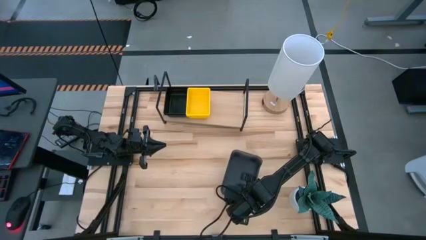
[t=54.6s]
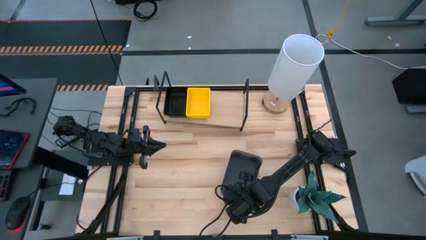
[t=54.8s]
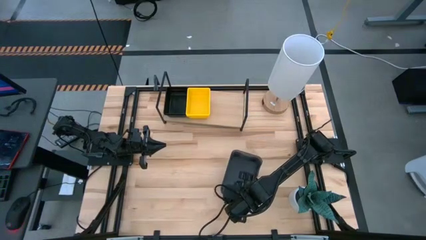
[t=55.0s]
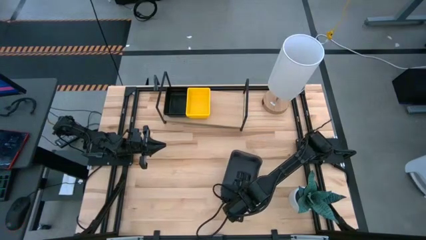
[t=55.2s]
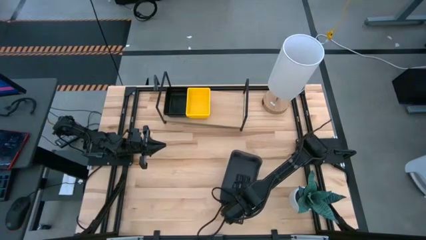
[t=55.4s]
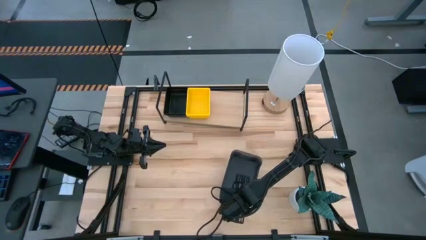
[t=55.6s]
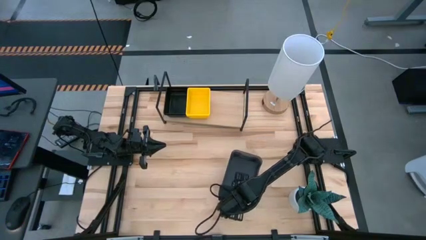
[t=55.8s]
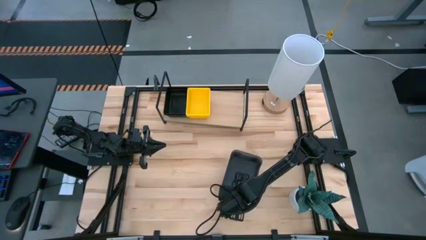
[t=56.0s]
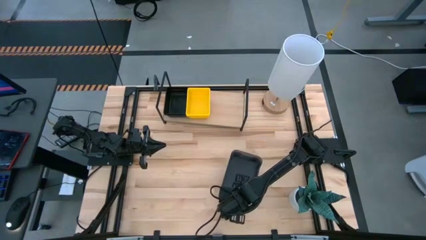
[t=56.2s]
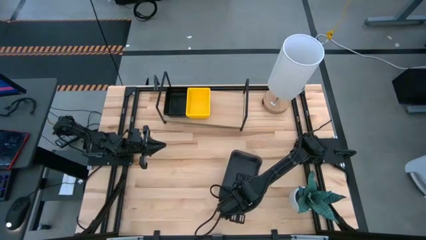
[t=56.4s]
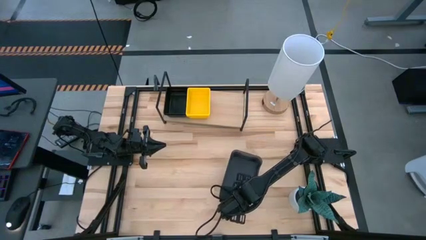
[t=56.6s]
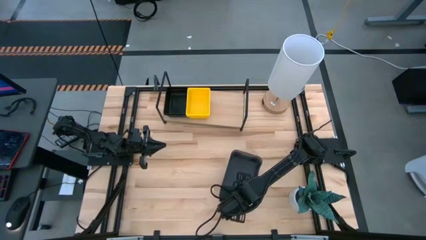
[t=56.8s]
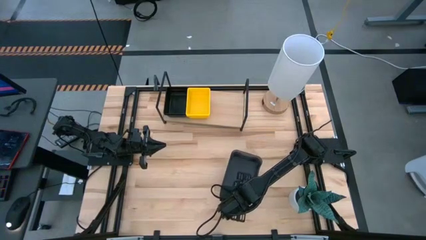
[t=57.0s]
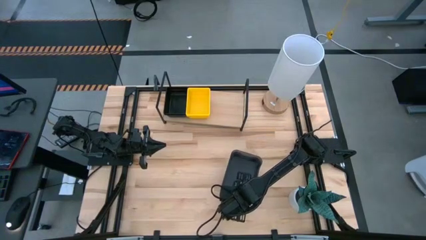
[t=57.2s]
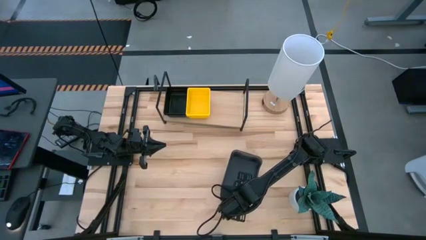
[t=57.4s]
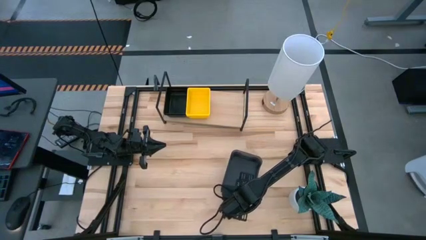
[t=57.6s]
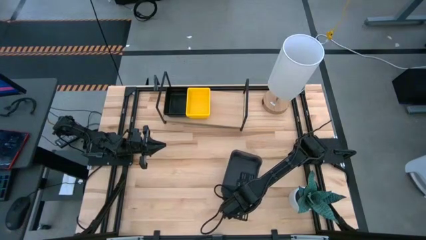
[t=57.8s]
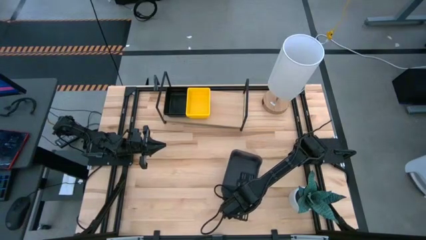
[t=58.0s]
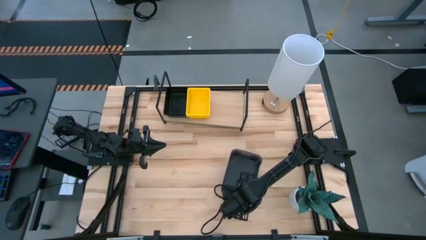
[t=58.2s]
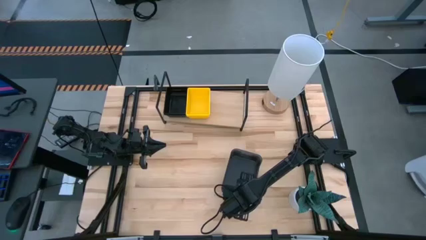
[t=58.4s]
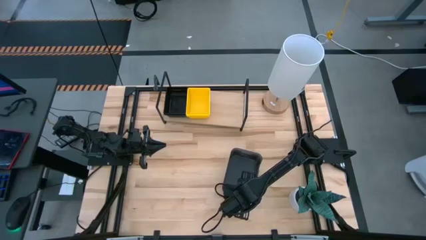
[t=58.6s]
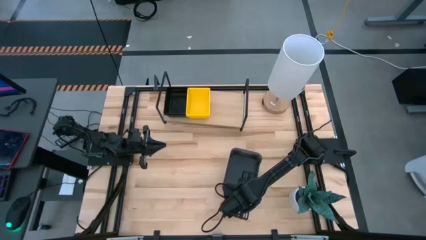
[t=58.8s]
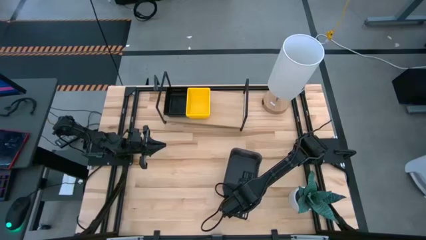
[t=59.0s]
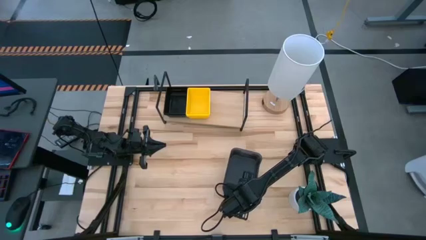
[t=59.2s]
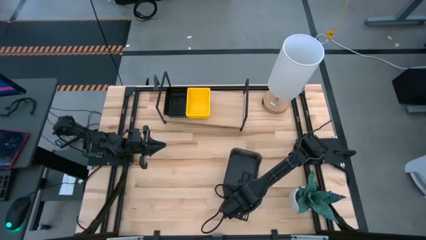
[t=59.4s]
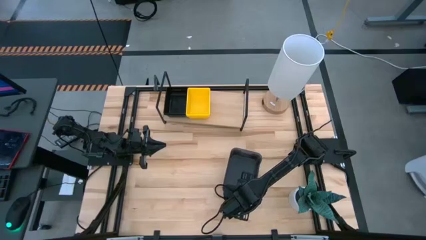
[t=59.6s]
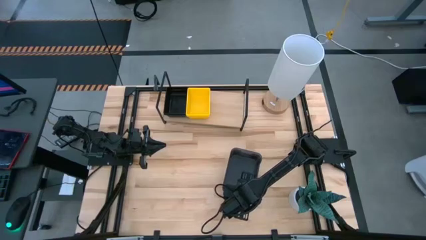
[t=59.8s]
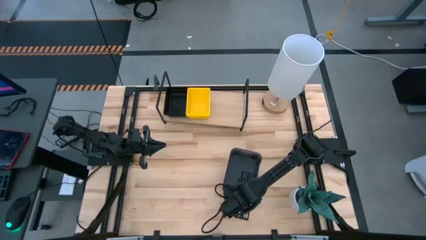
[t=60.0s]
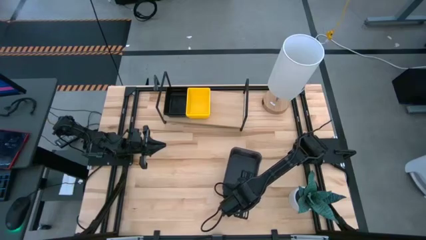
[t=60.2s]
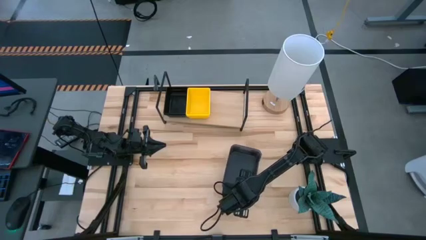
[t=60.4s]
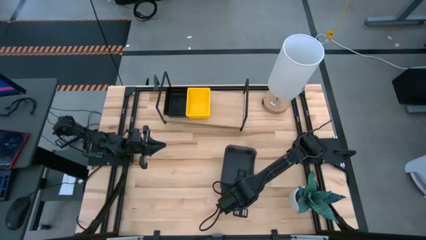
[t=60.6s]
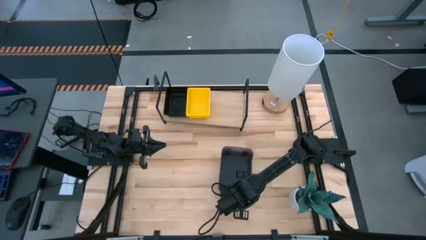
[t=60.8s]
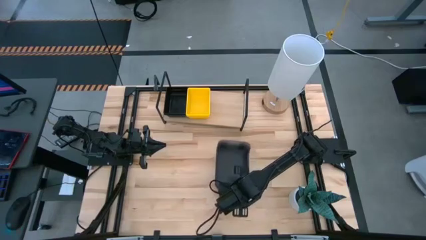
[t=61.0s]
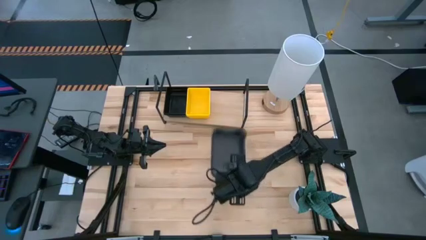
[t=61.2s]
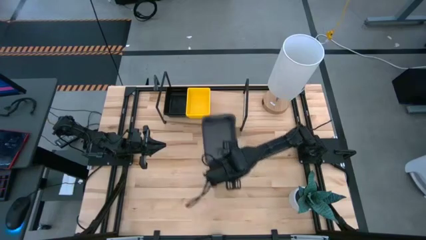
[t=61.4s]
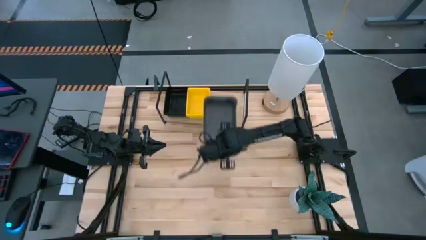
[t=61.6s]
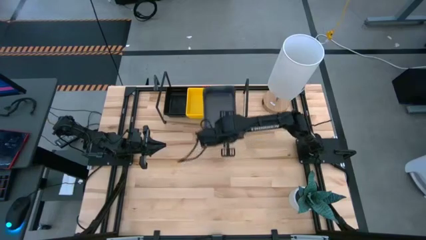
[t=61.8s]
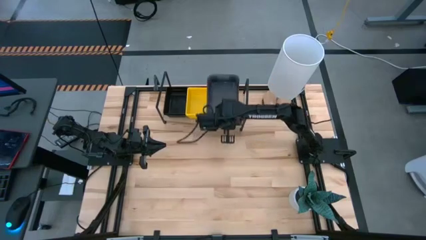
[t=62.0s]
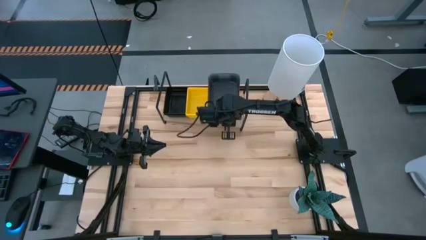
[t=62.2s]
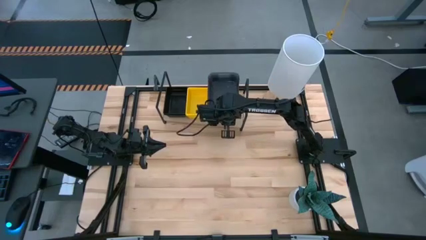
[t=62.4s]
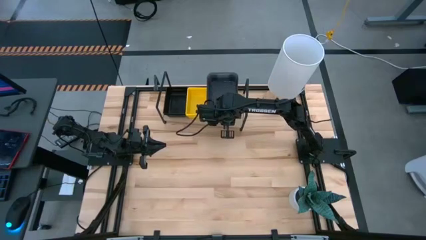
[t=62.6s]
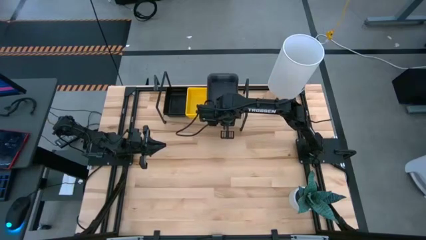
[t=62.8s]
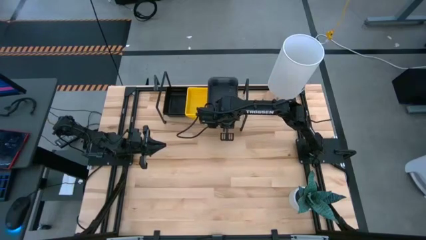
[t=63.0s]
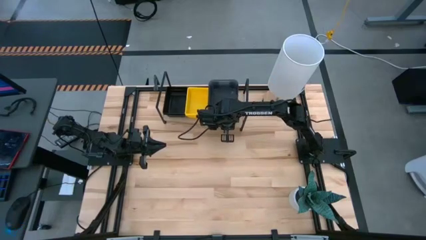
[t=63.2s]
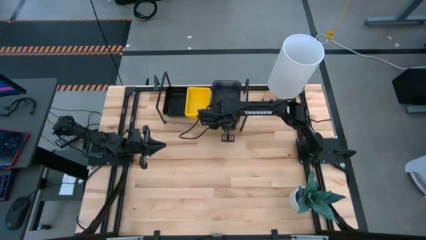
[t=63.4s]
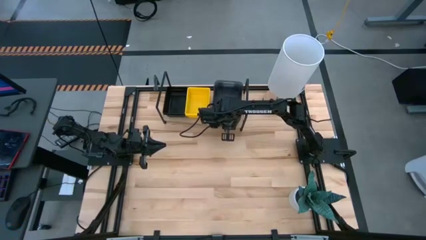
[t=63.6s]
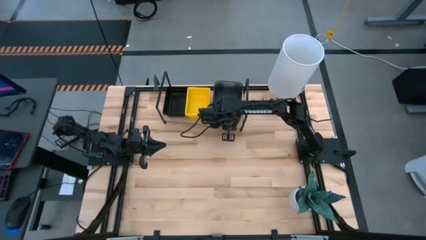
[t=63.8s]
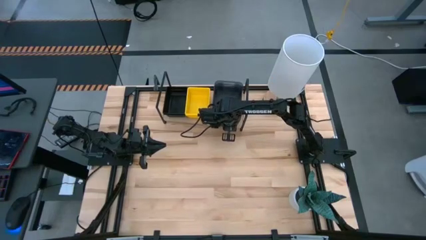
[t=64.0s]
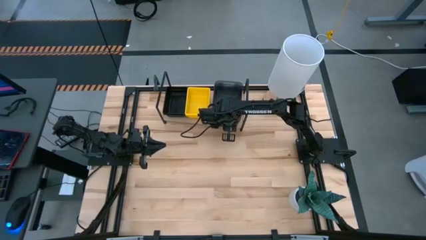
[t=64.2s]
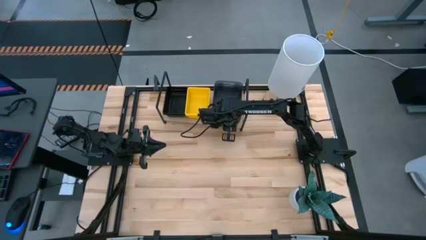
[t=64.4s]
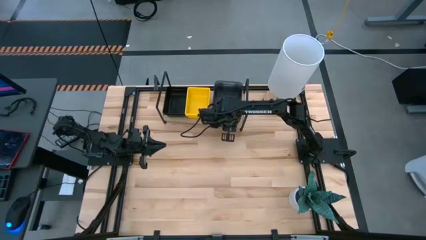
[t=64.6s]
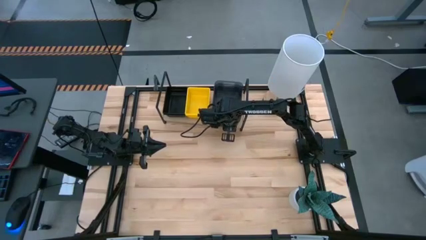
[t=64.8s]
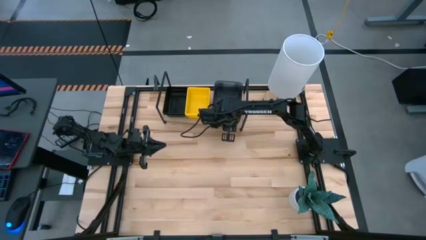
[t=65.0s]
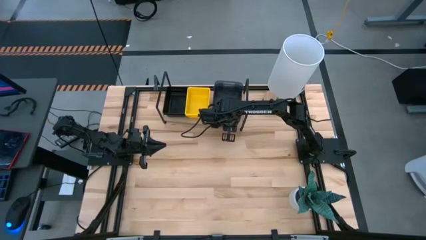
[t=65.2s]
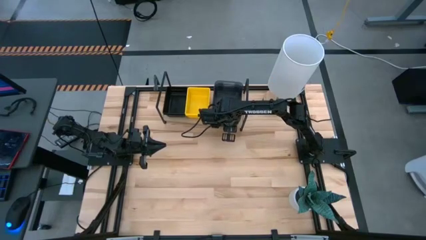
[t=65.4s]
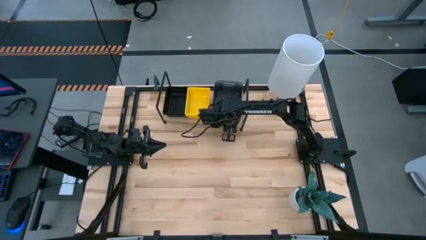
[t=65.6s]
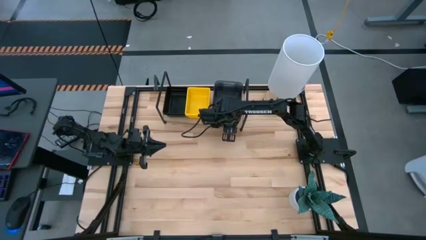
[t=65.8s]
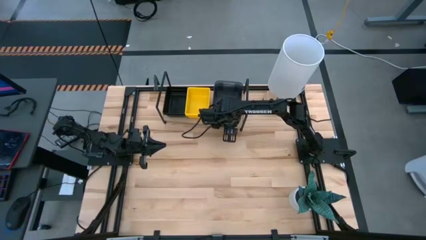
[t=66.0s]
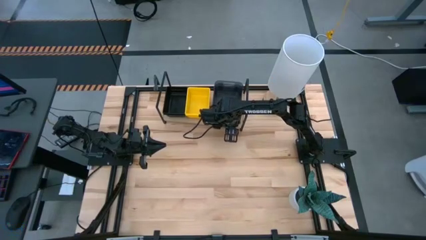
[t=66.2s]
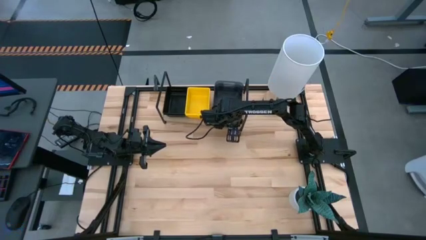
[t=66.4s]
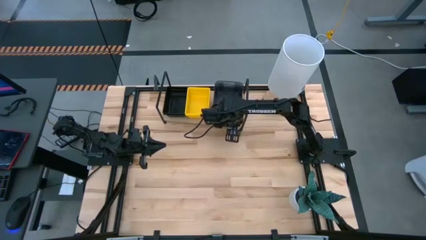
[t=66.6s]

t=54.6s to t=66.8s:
Task: Stack baskets on shelf by color
Put the stacked black bin on the shelf

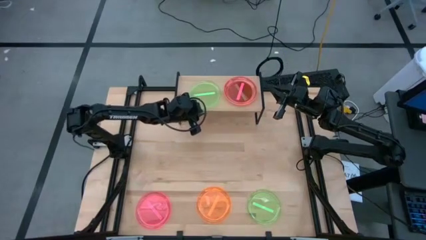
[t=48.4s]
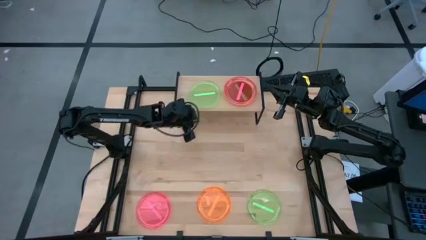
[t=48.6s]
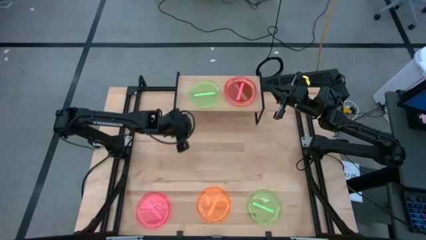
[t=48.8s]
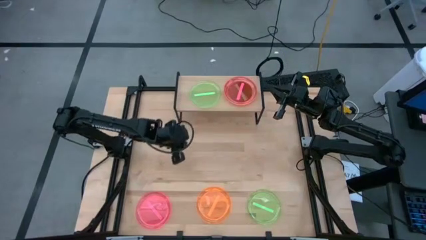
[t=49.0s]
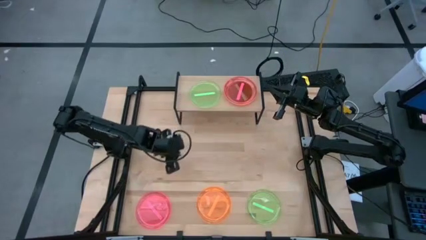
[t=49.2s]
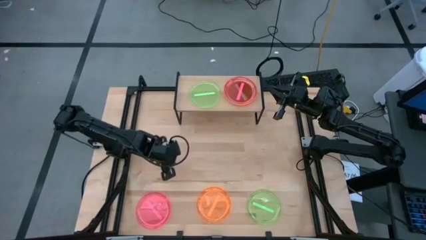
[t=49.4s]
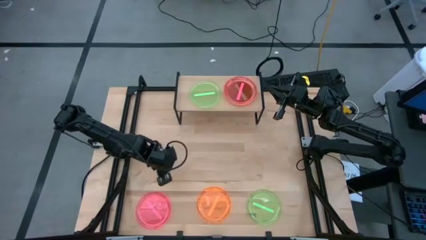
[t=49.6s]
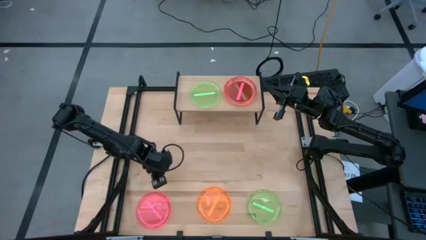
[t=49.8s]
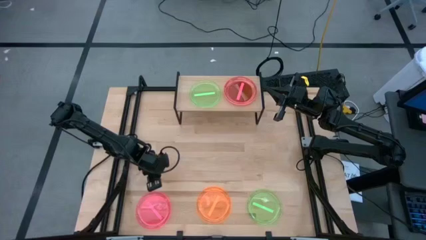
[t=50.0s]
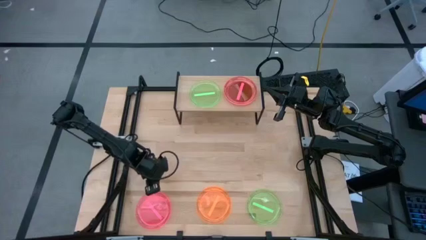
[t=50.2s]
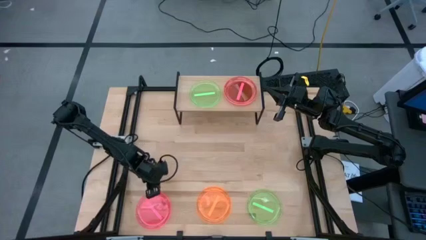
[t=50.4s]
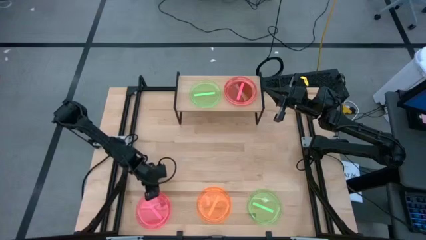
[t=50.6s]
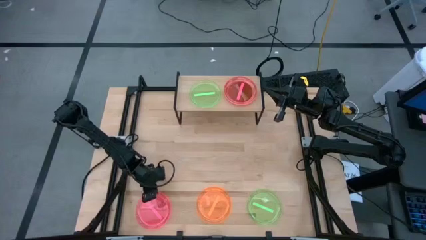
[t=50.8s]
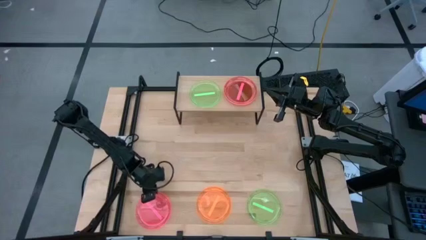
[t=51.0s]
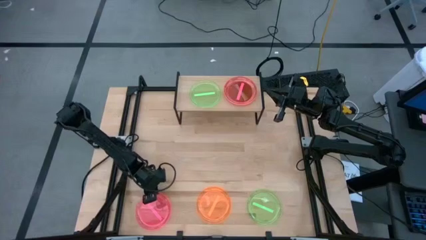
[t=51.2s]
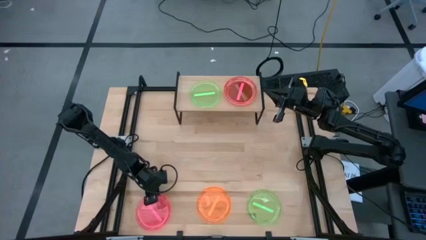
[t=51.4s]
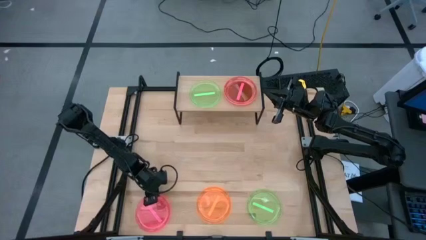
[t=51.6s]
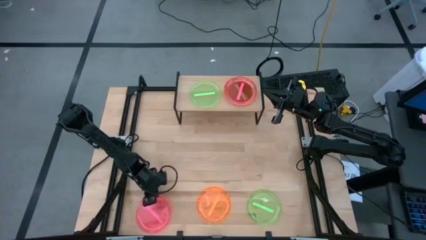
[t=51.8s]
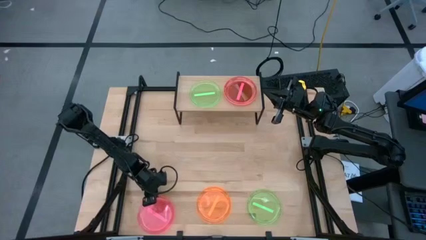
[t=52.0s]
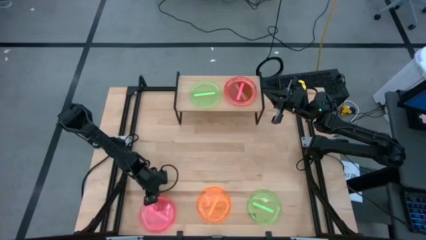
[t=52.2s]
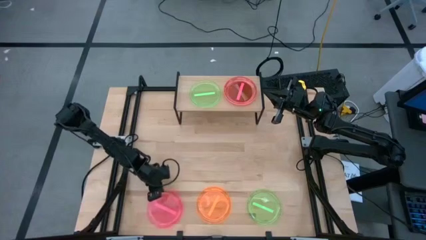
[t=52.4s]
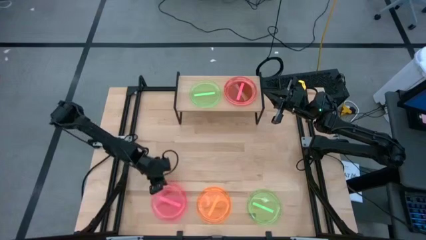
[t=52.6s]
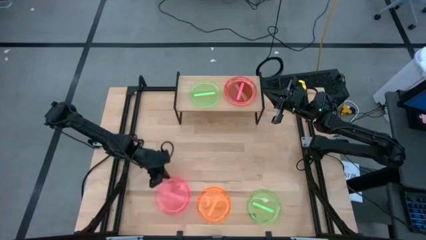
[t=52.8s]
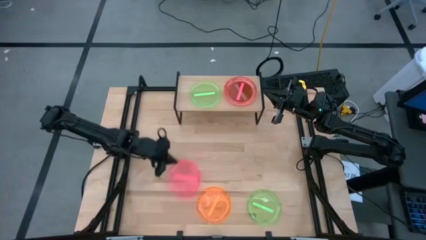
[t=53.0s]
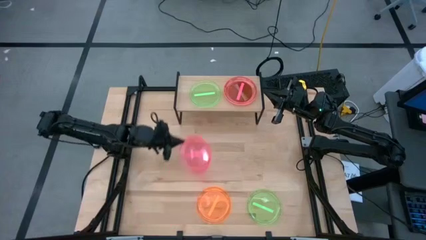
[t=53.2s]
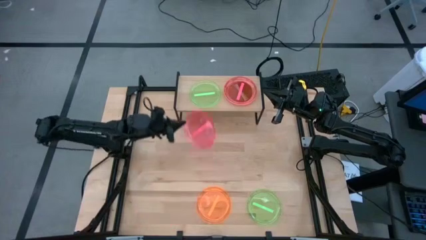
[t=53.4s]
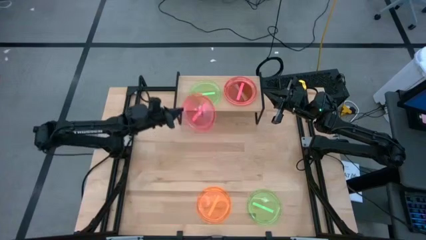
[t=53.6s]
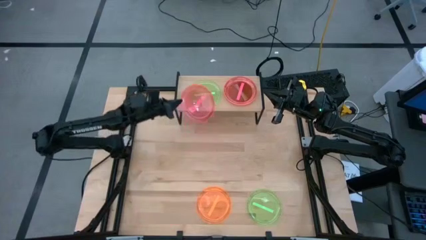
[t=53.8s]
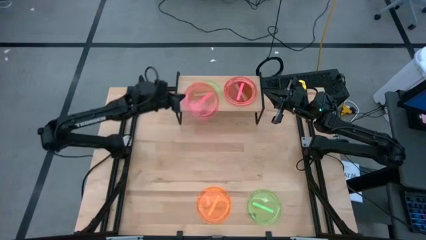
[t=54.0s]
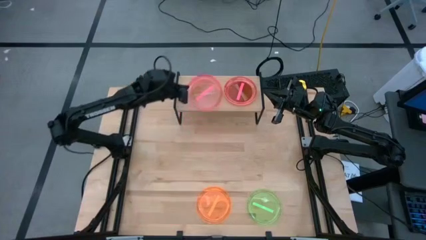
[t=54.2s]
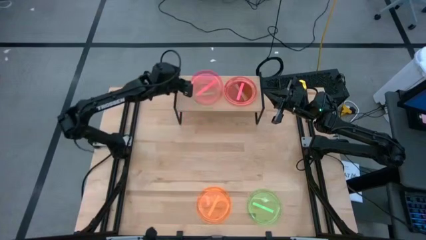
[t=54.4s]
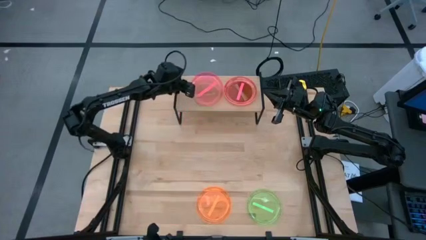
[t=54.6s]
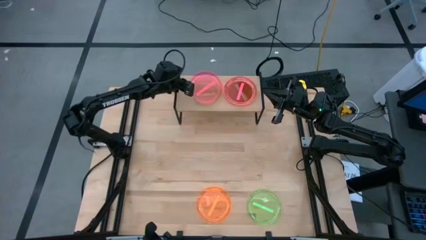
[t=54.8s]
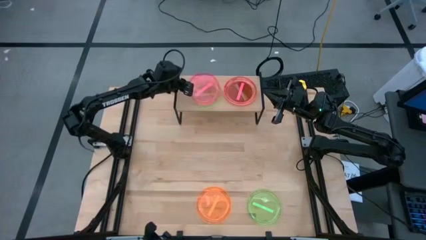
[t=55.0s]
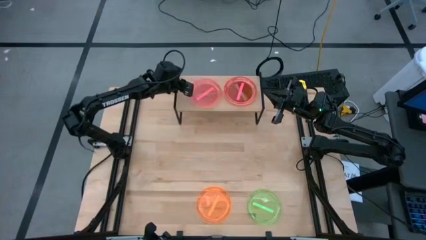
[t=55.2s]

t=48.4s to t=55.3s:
Task: Place and stack plates onto a shelf
Stack the red plate on top of the green plate on the shelf
